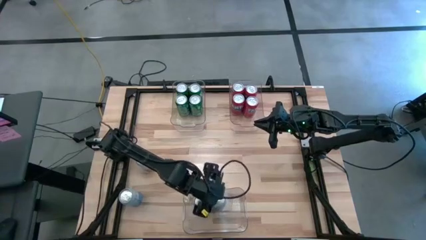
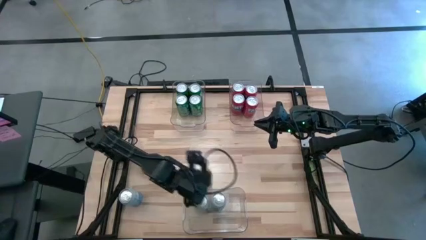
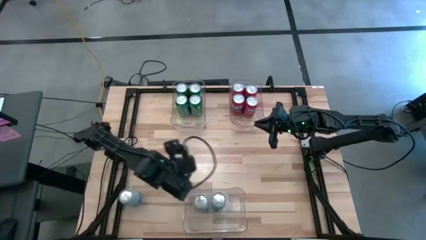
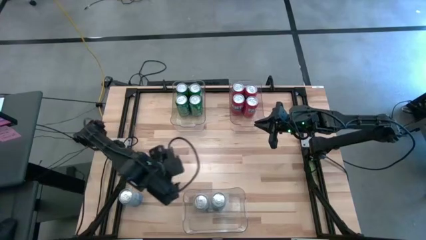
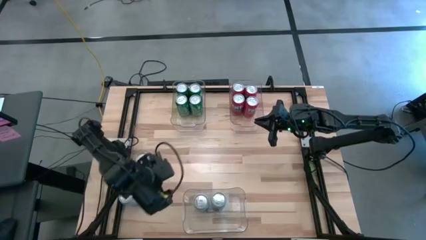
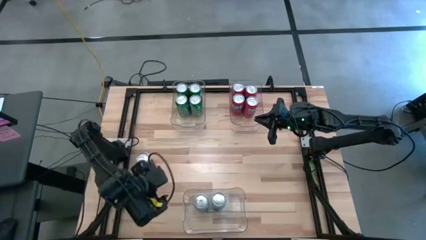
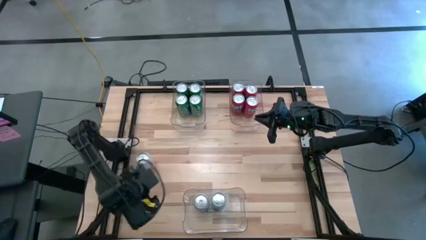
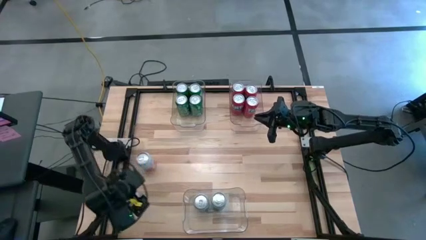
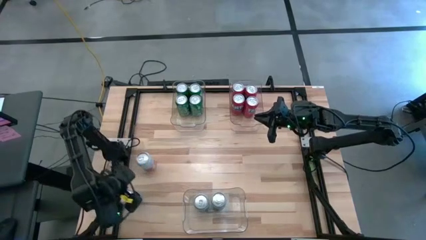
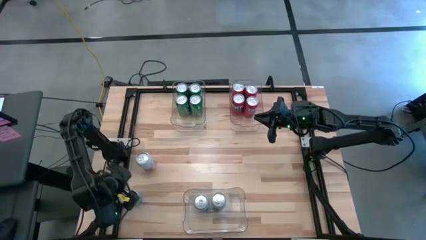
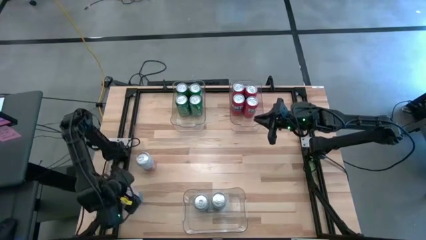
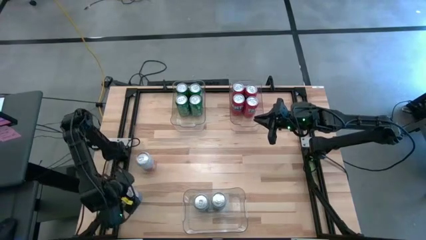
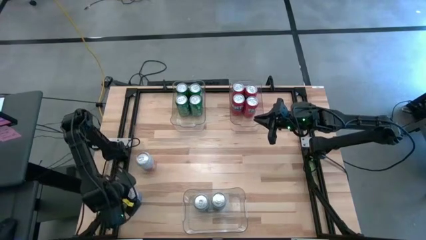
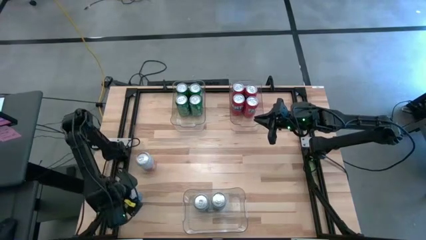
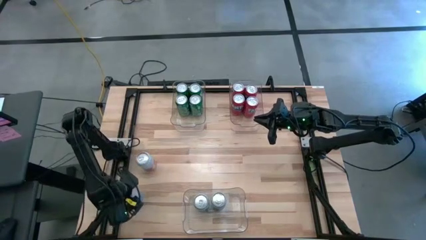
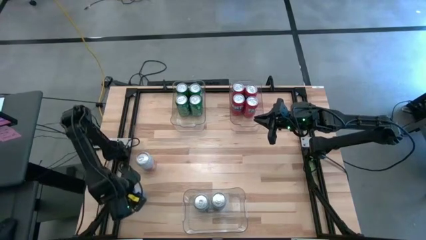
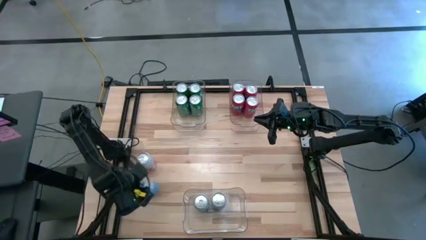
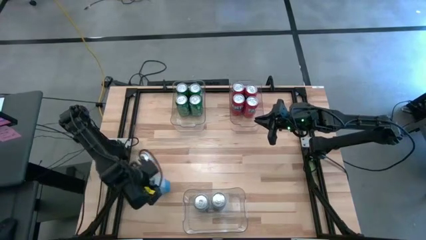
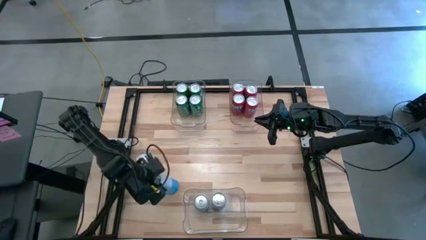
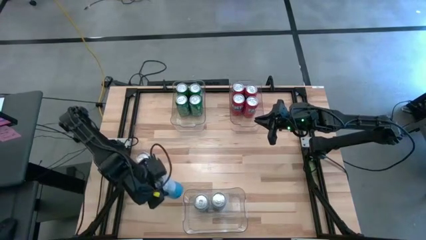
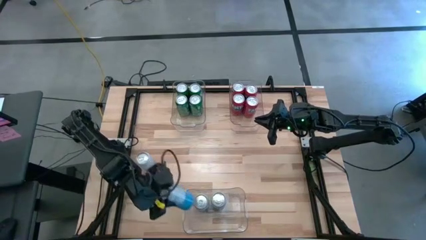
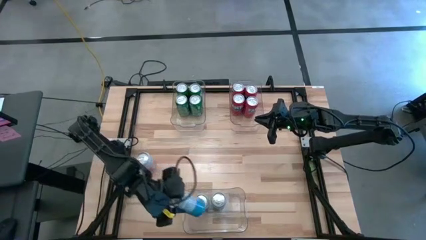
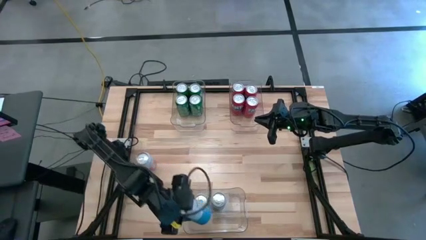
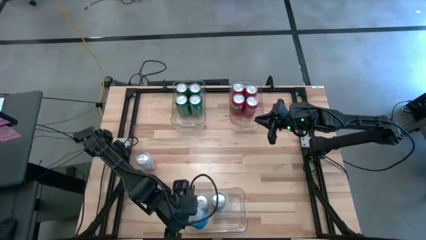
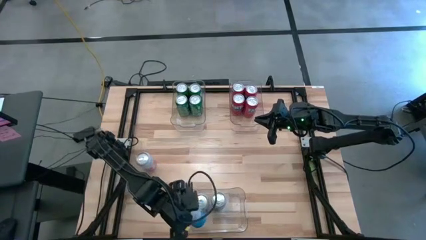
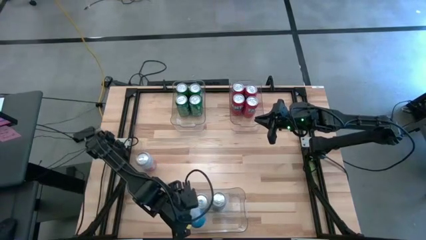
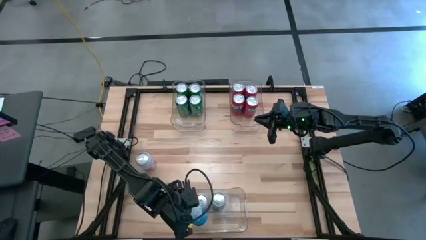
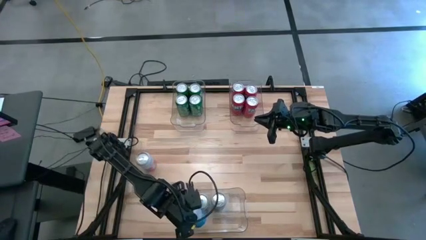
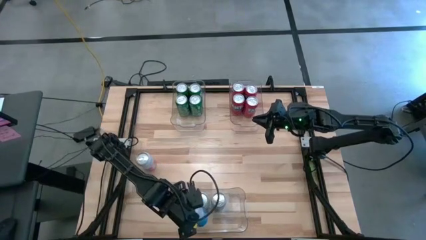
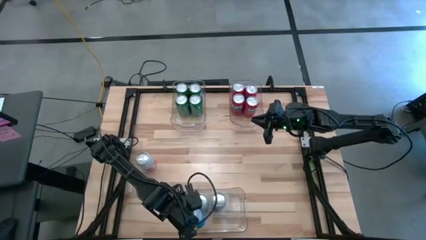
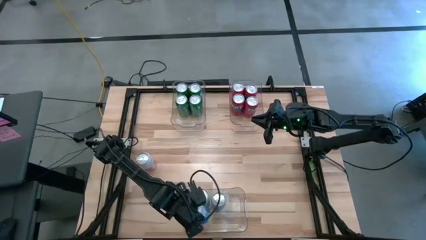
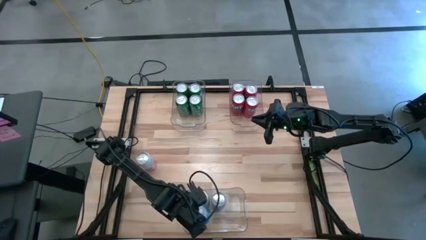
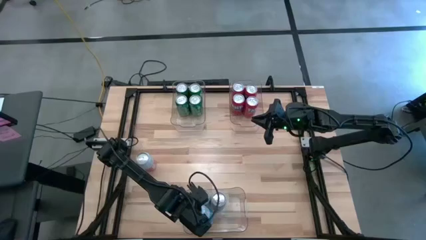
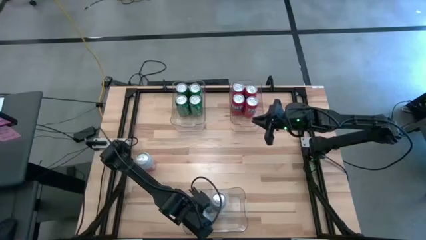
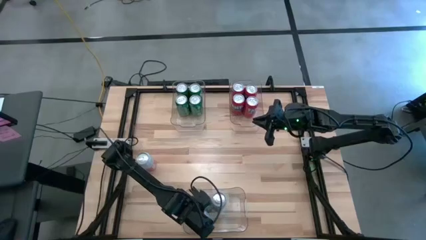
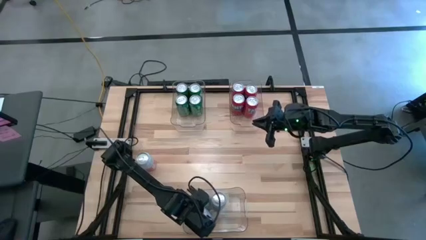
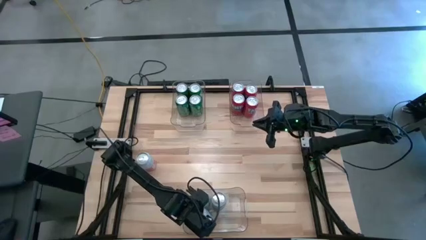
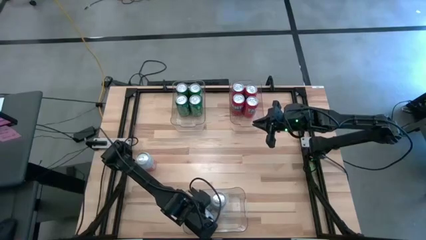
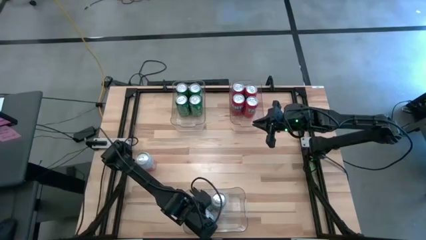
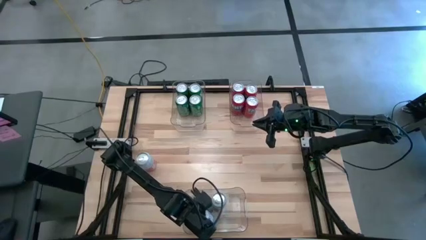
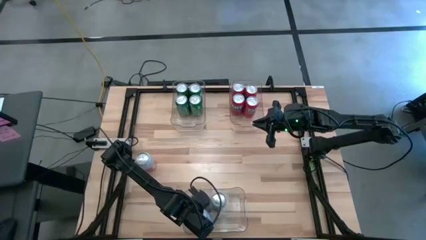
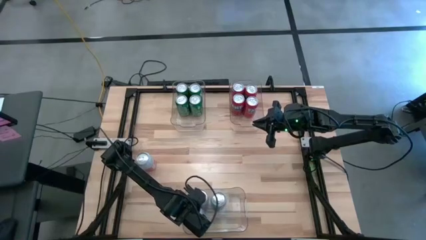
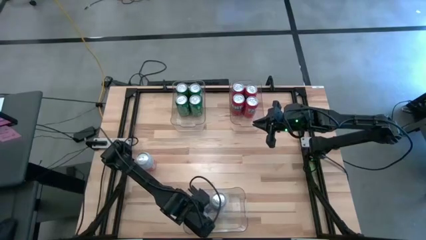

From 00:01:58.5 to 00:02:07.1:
Task: Sort soda cans
Put the blue soda can into the bottom transparent bin

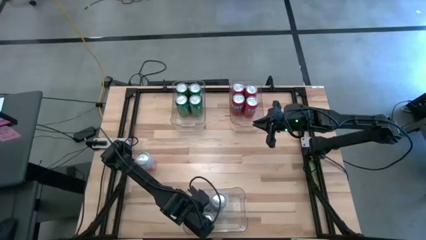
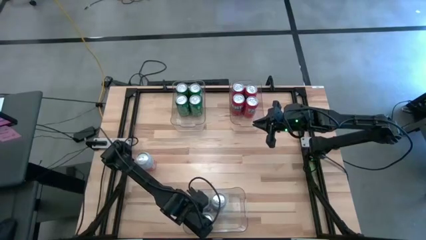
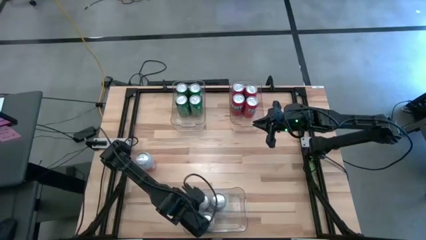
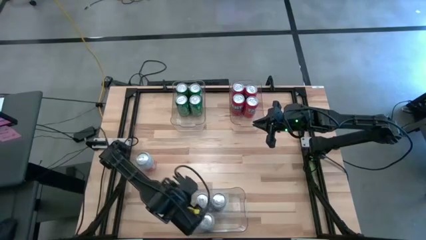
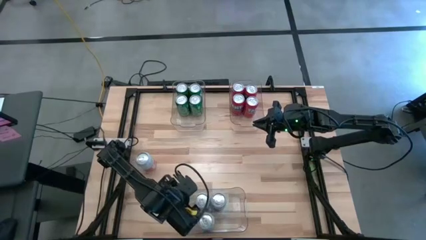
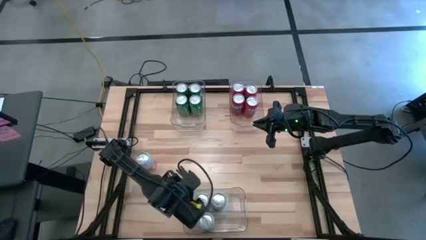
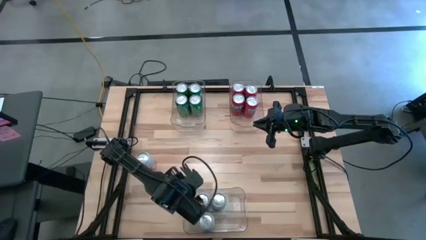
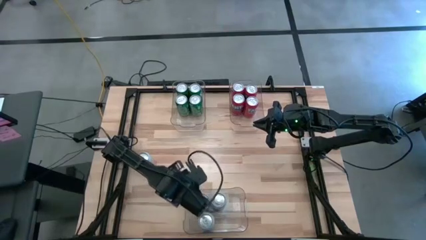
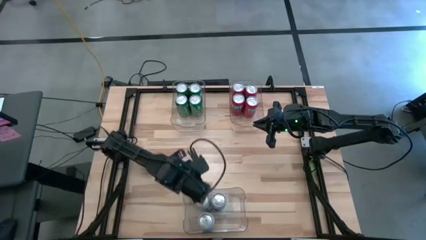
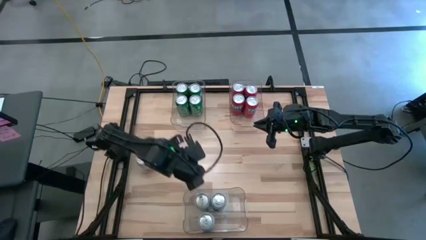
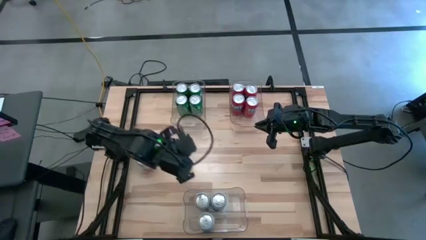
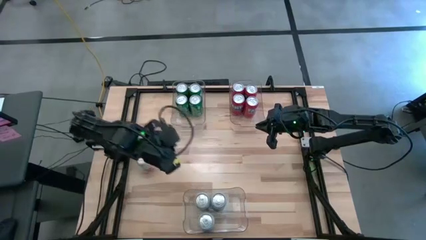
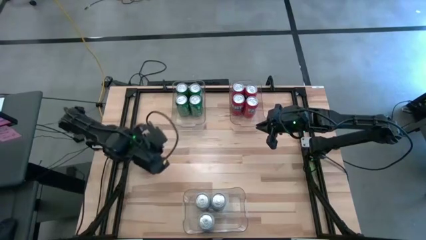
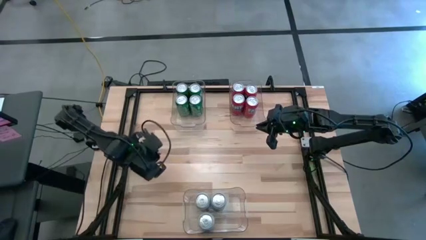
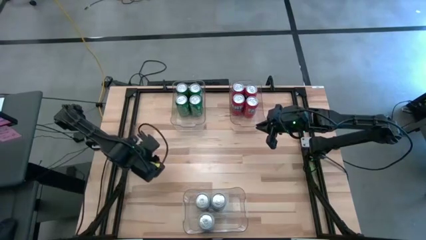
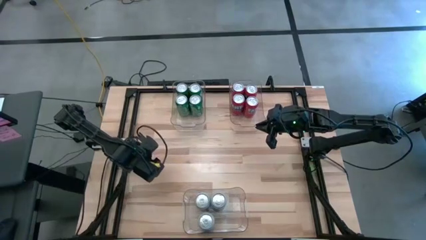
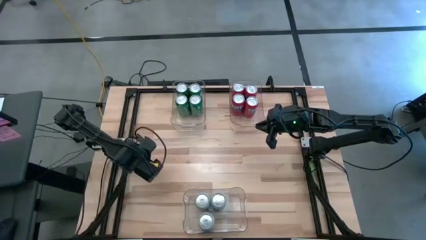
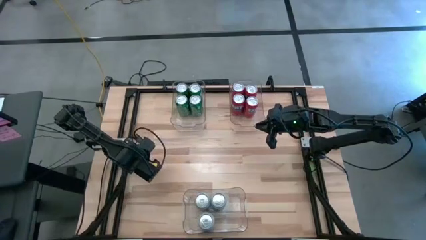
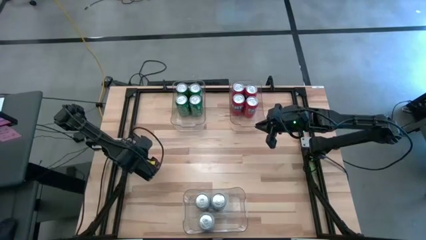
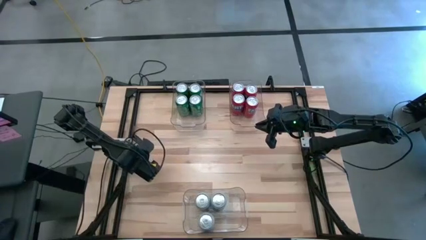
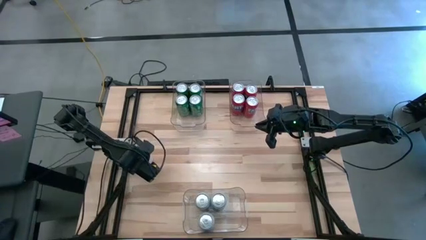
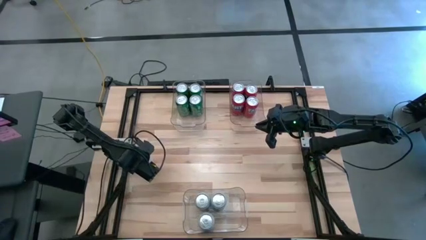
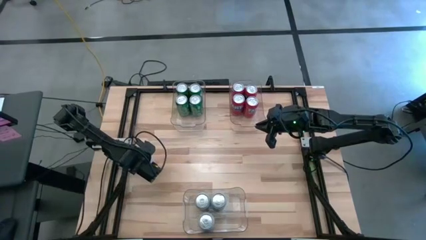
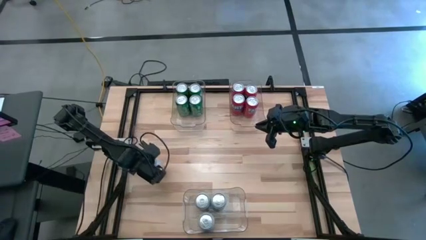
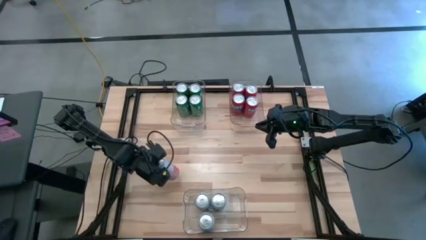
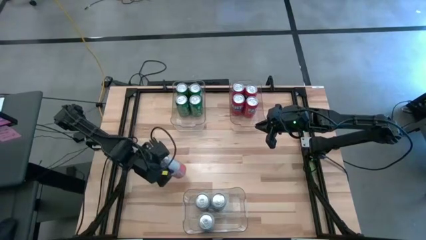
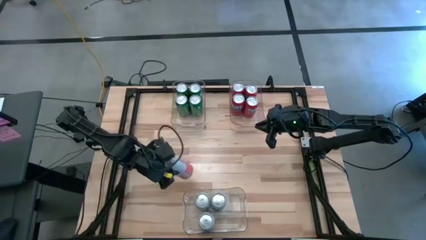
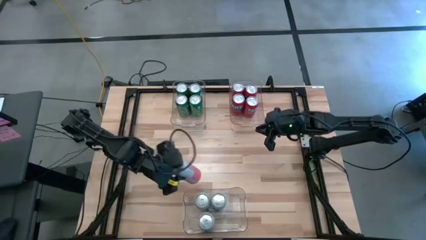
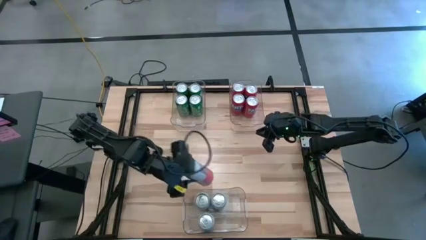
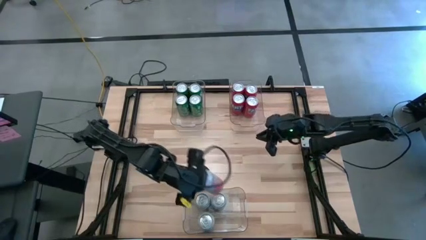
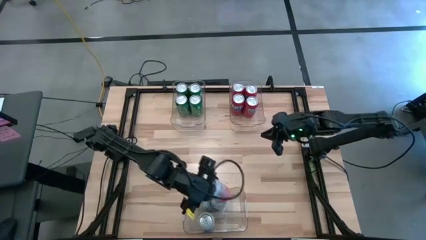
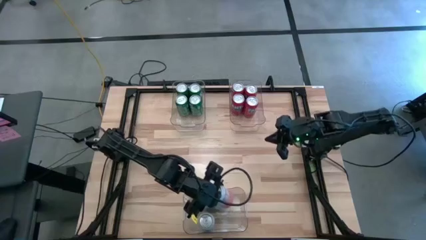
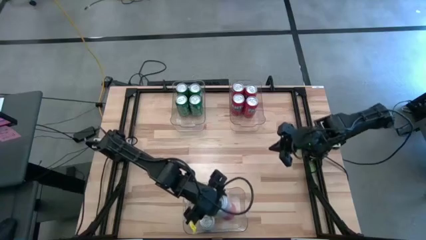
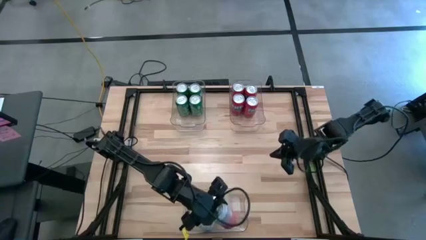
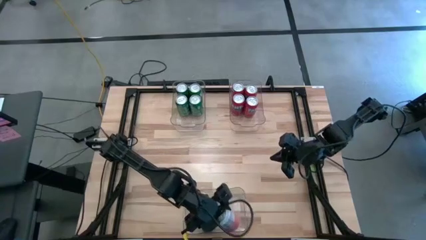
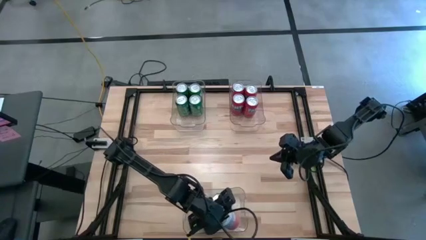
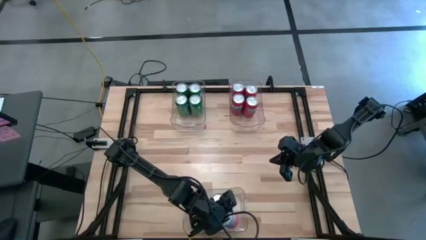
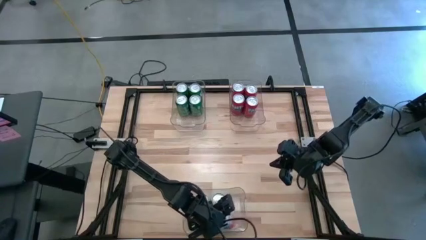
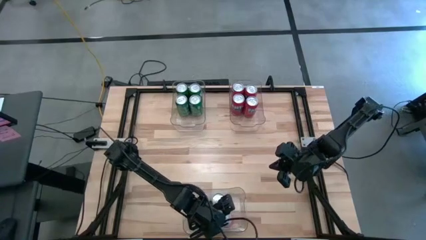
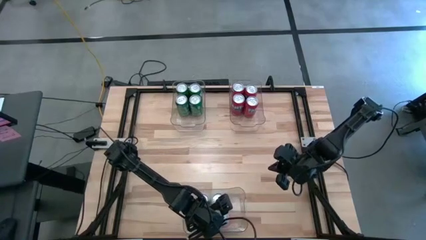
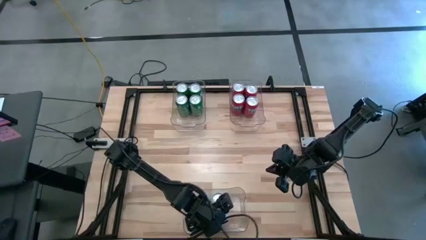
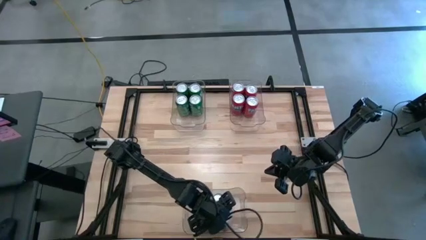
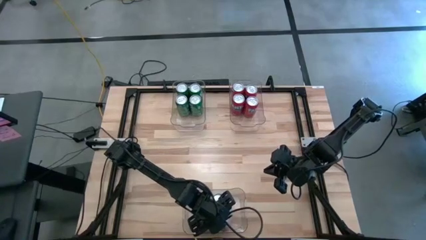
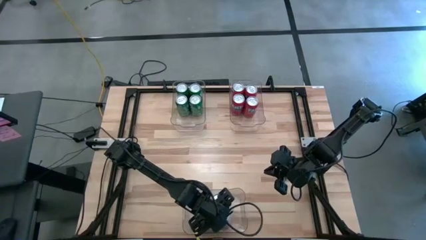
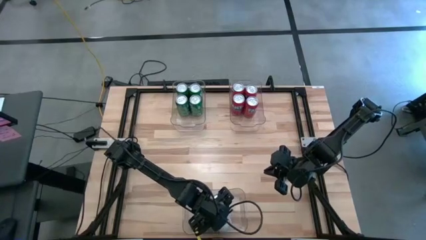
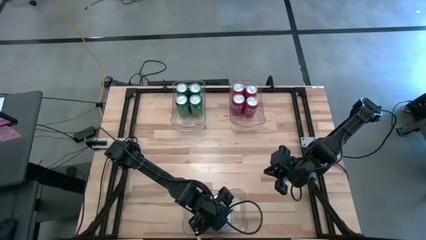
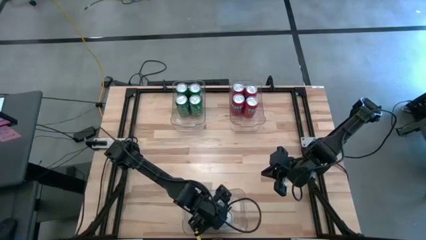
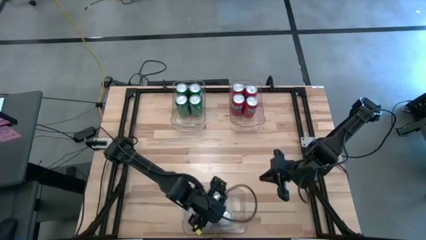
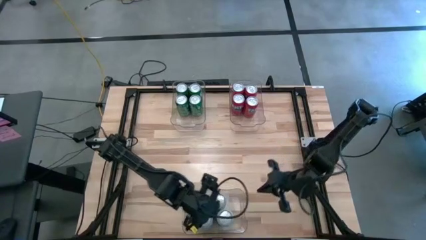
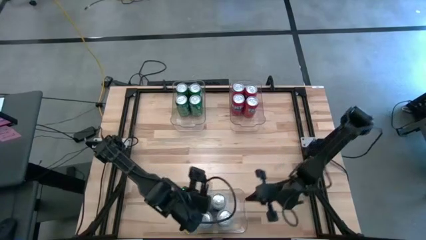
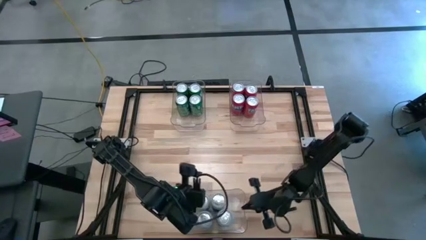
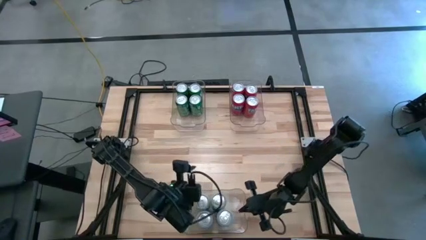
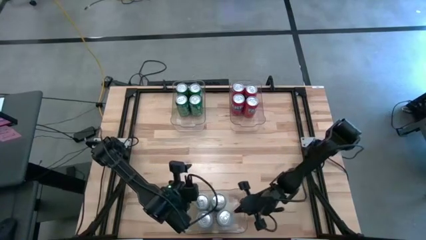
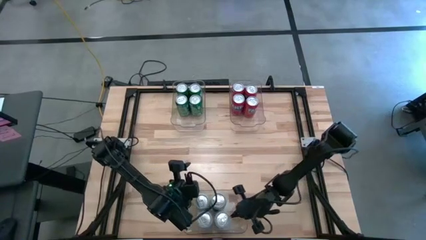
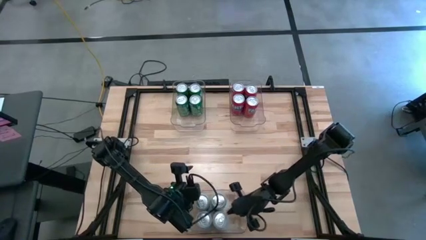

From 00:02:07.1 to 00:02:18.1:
Put the orange soda can into the bottom transparent bin
